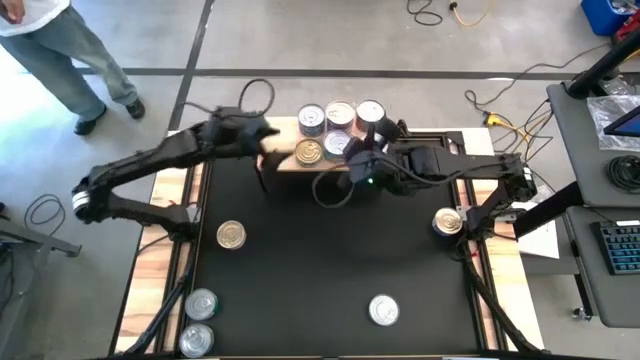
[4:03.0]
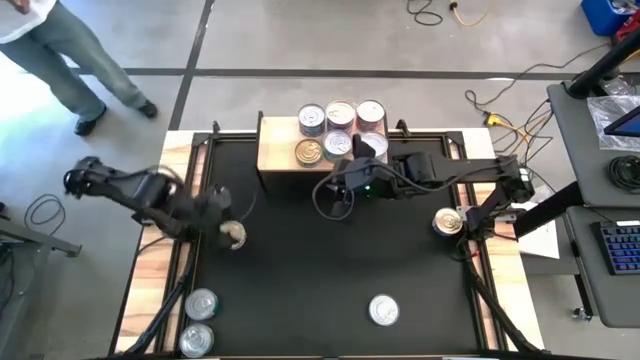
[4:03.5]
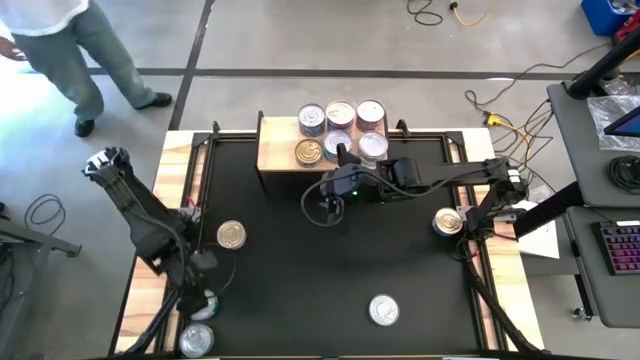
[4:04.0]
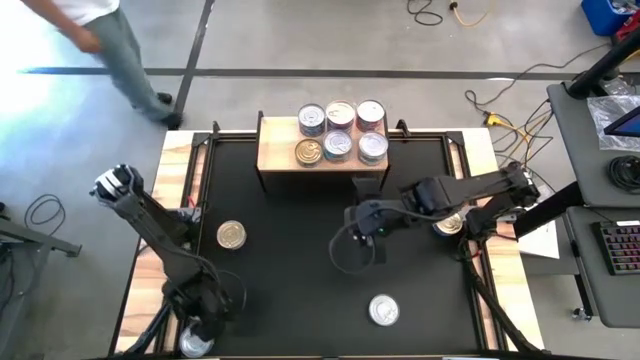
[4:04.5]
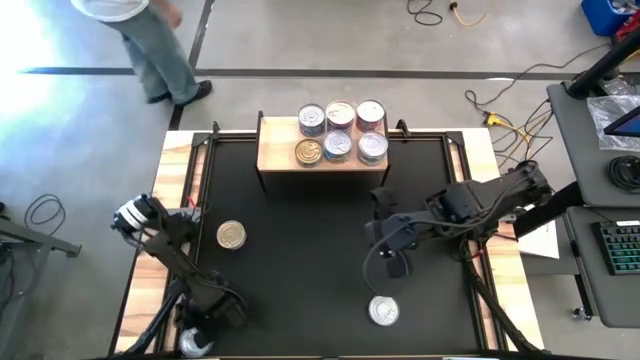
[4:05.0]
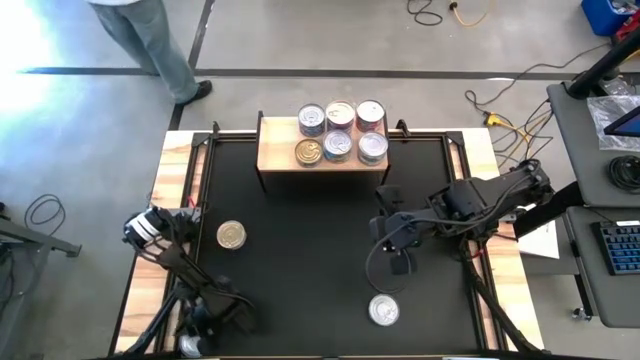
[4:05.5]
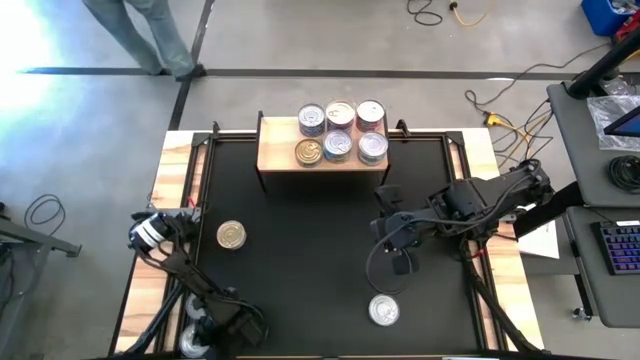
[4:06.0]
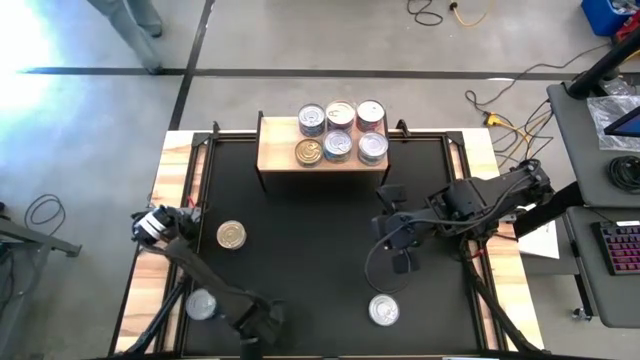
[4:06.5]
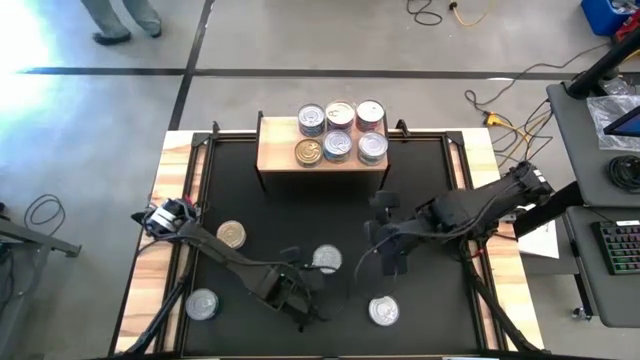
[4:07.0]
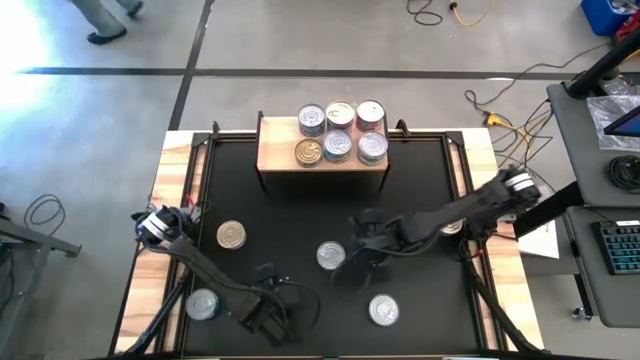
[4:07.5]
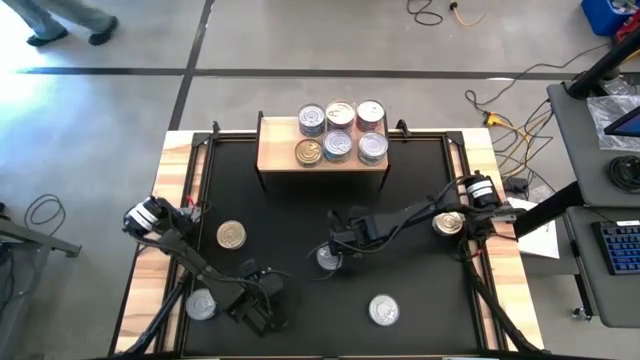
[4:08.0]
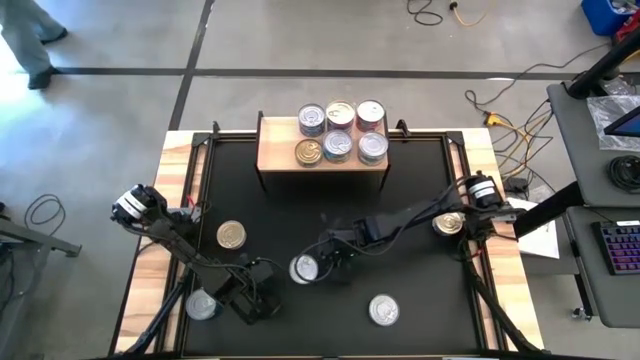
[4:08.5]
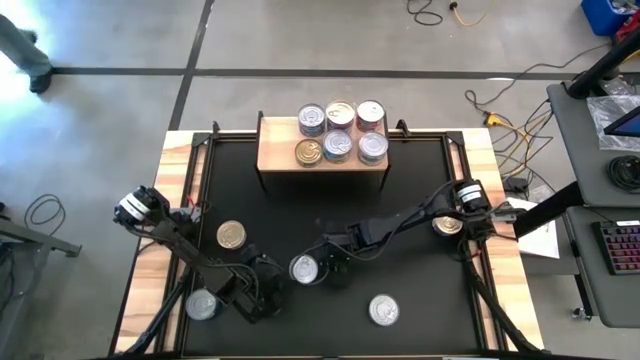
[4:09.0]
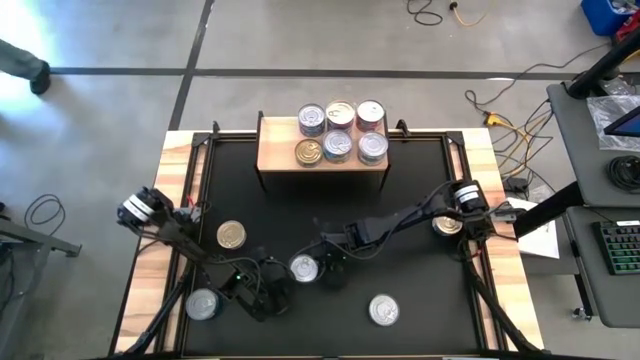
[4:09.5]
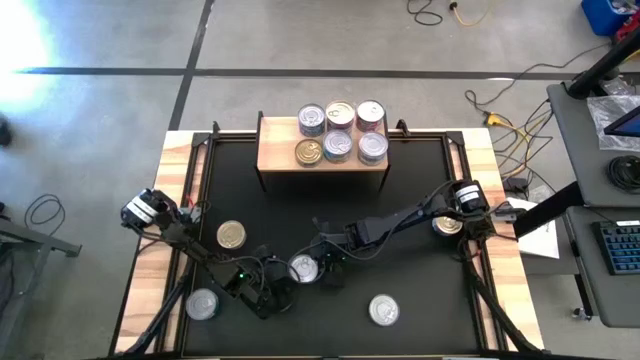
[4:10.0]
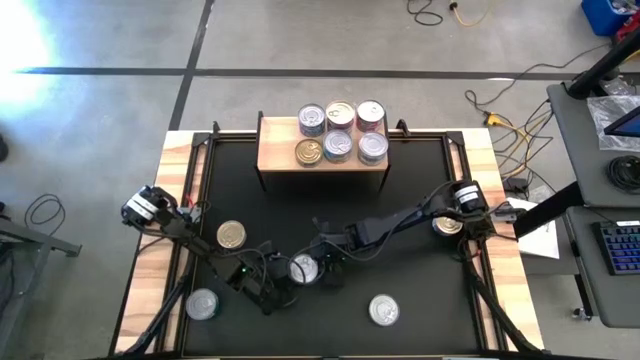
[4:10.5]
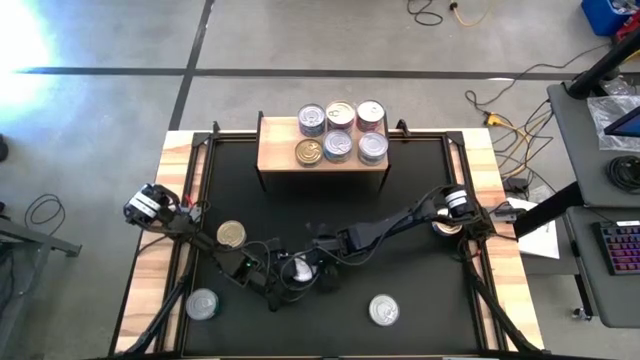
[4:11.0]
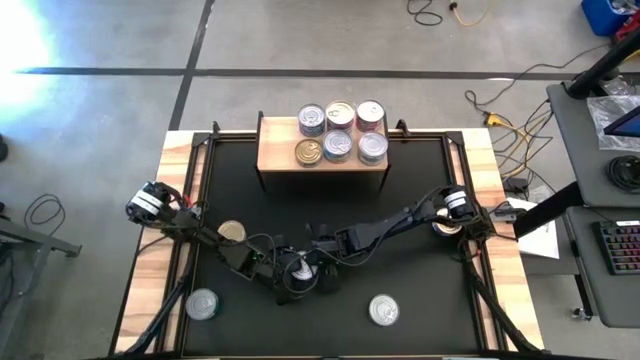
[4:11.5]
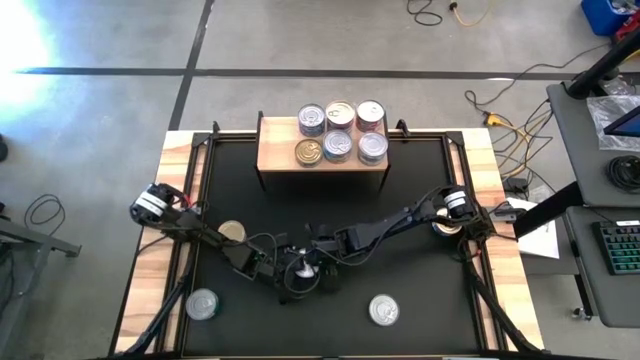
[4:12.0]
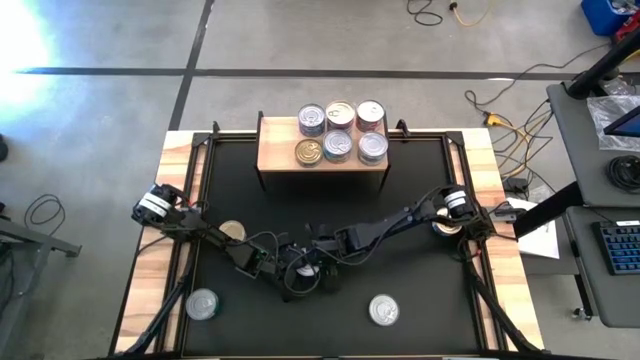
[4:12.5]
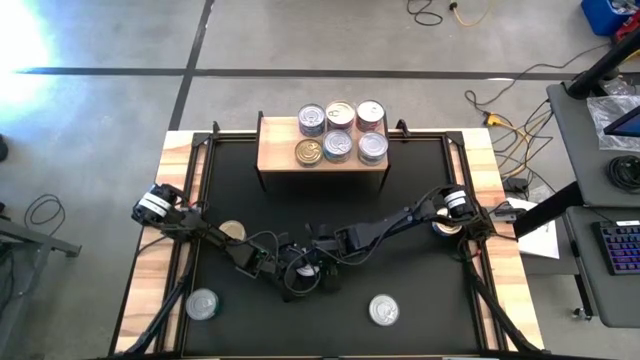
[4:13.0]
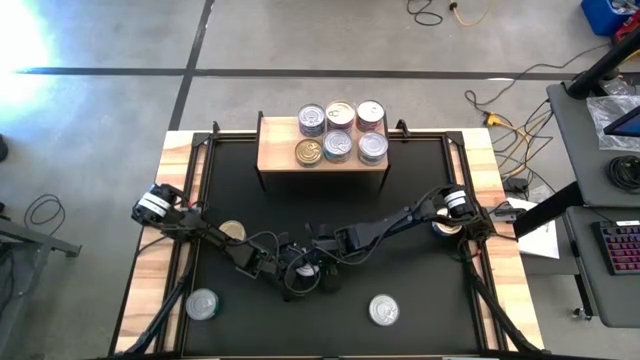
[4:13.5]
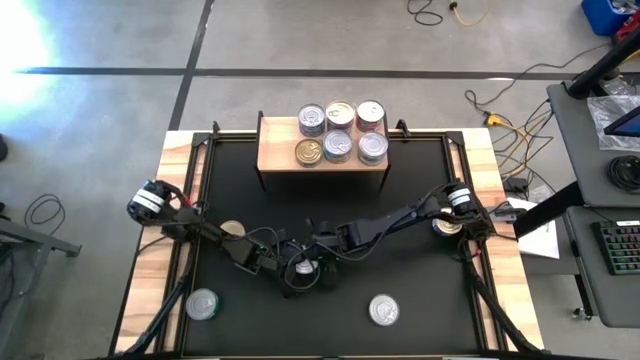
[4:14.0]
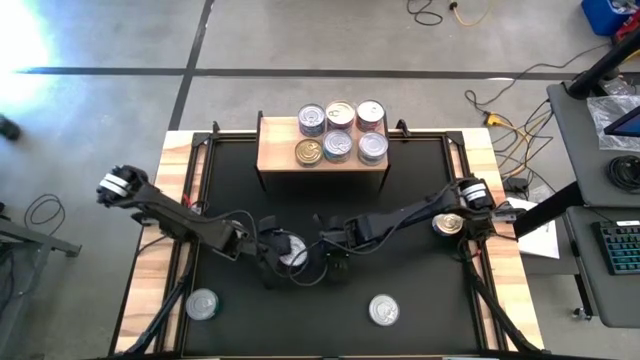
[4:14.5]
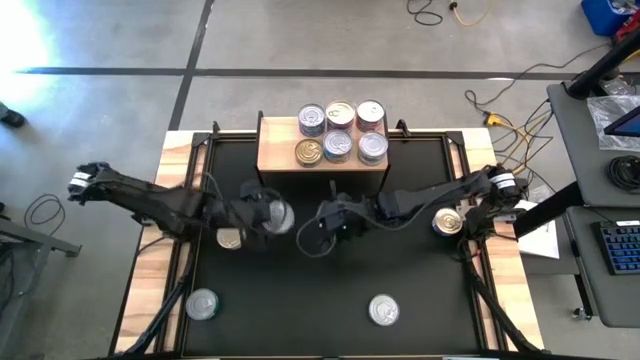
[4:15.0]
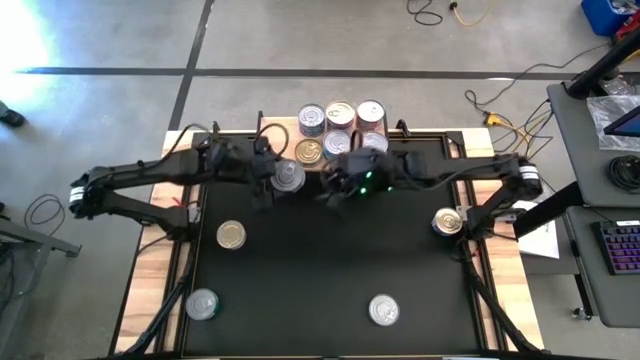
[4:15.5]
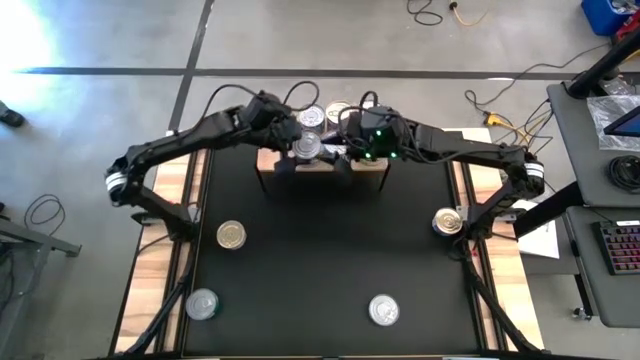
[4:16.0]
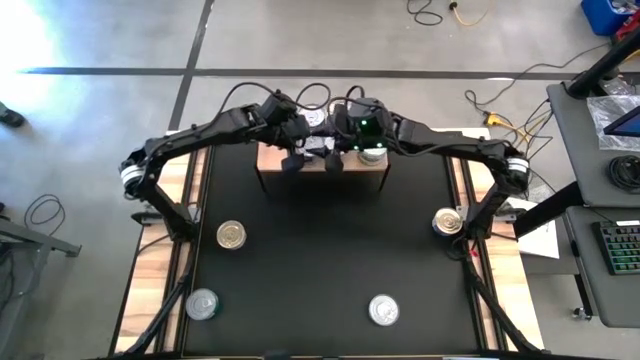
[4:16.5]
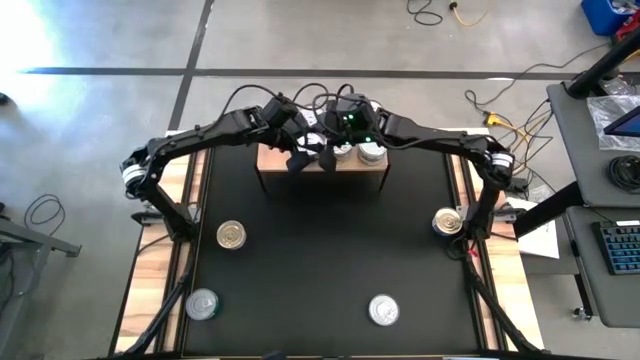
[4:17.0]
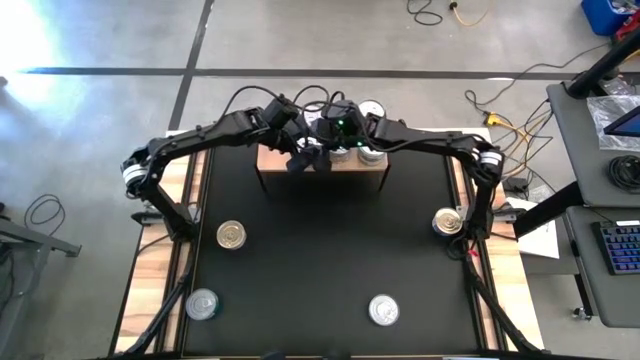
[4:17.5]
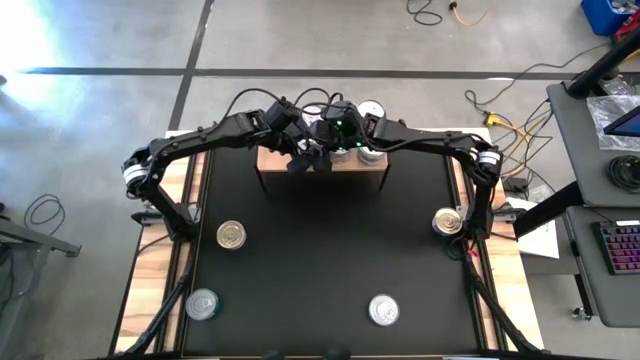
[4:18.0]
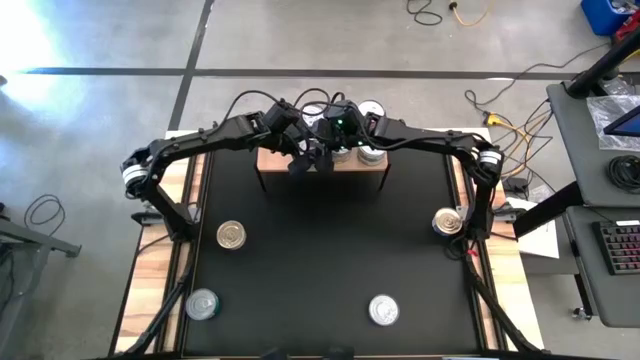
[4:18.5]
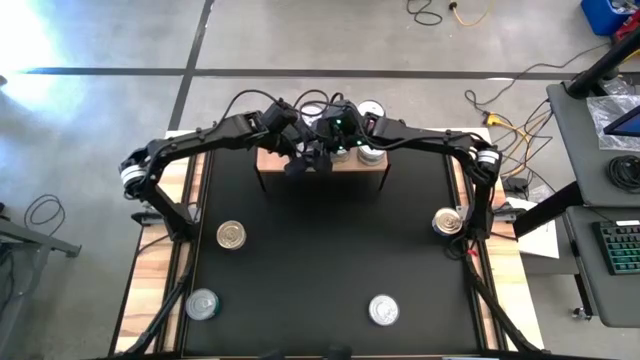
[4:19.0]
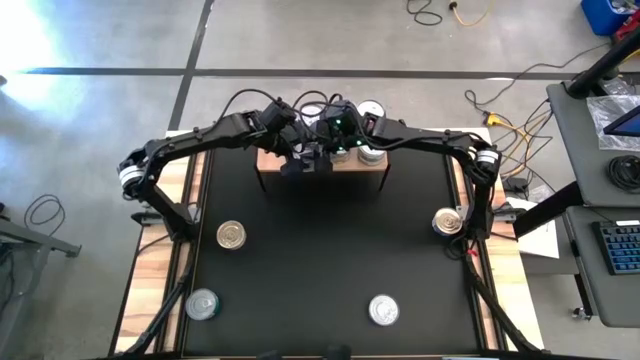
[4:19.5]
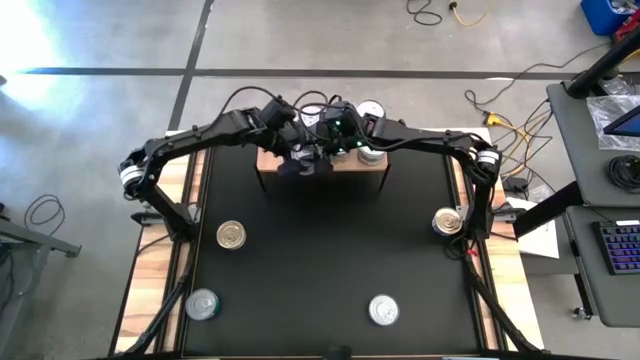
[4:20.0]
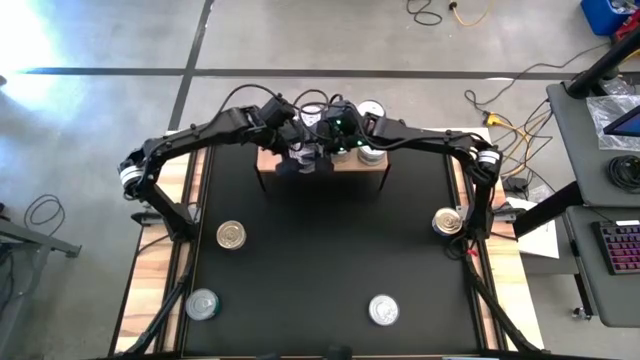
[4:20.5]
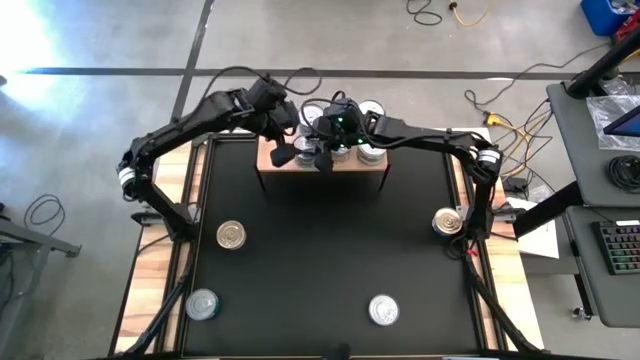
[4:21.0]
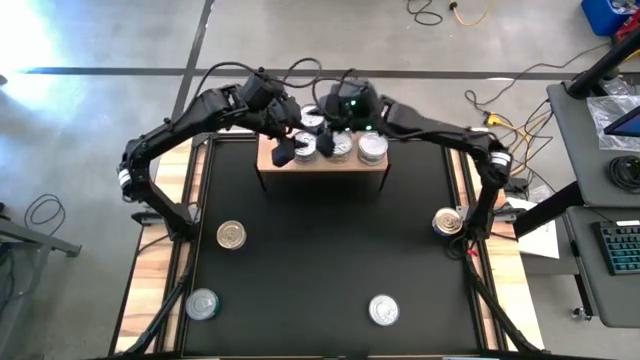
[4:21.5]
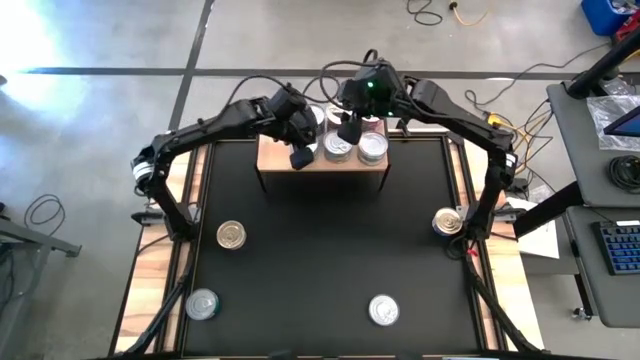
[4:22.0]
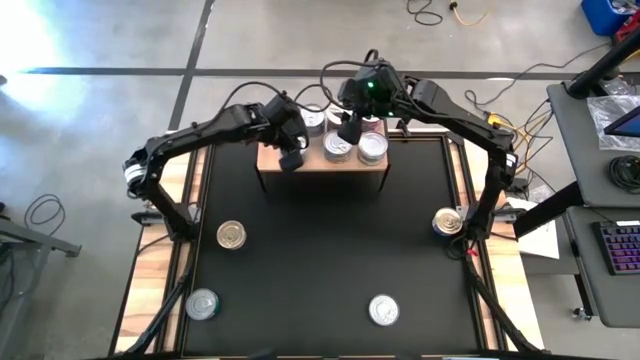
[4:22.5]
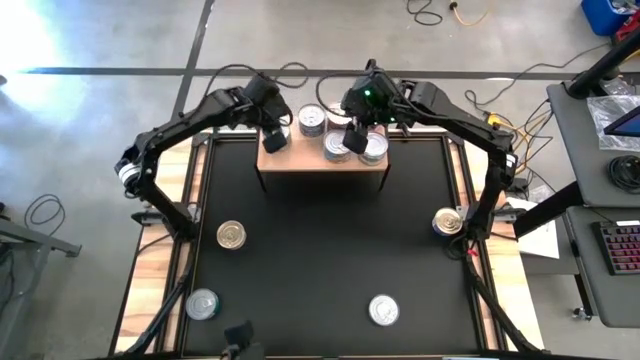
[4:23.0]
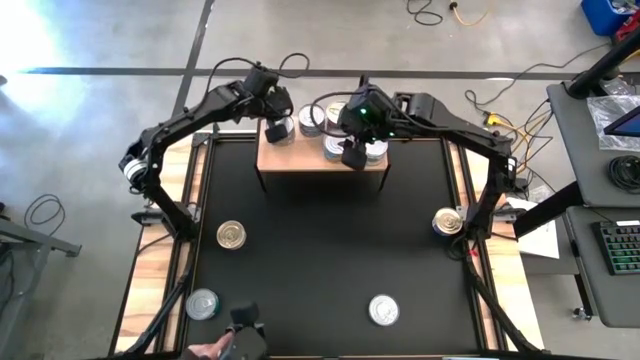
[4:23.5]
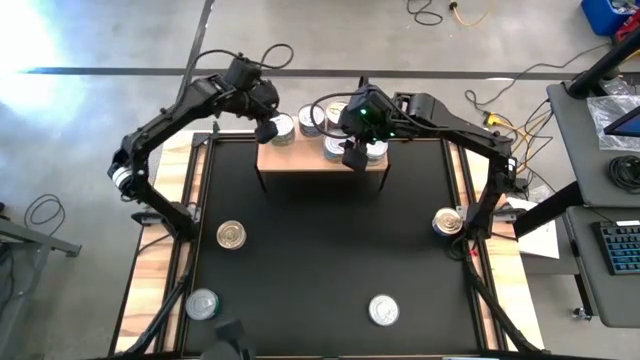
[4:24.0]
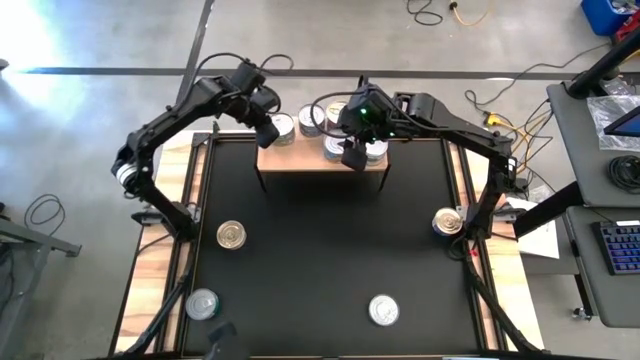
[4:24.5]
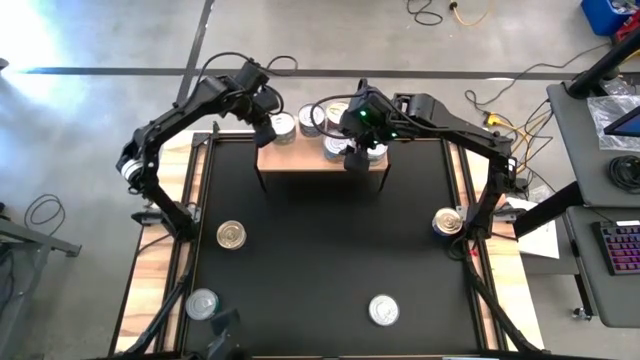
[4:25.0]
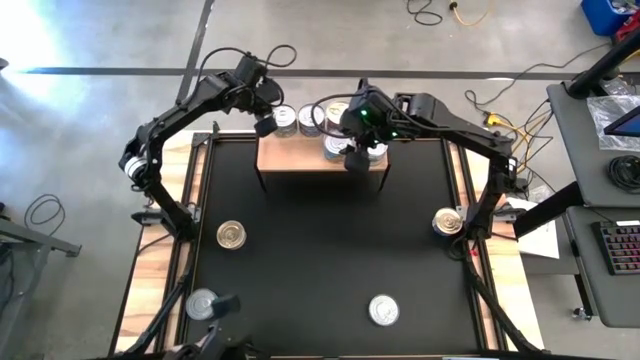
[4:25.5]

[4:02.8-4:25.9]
Task: Stack canned seafood by type on shelf
Stack the green tuna can on top of the other green tuna can on the shelf
